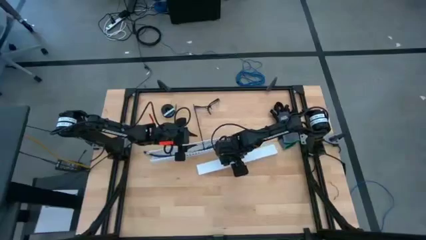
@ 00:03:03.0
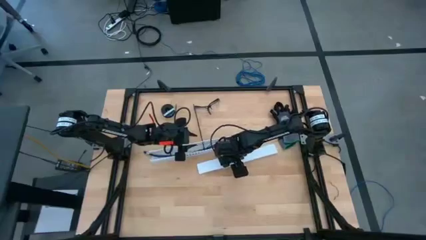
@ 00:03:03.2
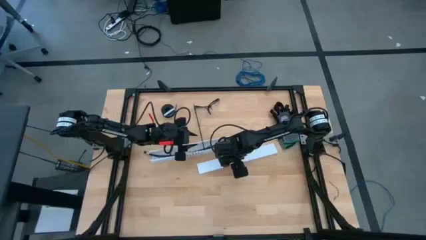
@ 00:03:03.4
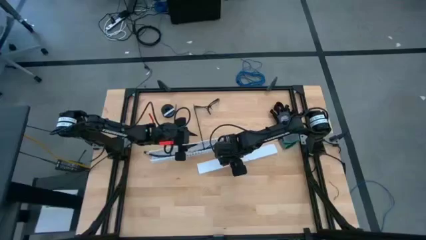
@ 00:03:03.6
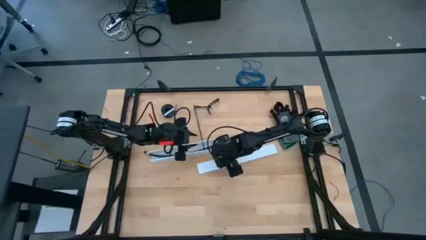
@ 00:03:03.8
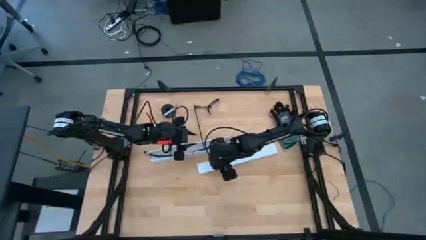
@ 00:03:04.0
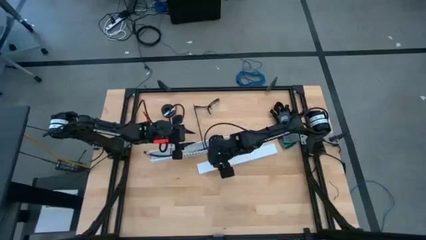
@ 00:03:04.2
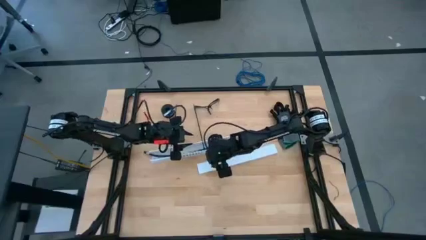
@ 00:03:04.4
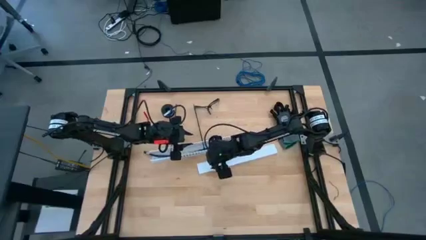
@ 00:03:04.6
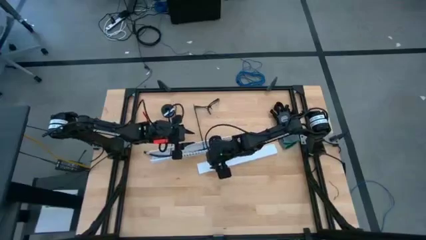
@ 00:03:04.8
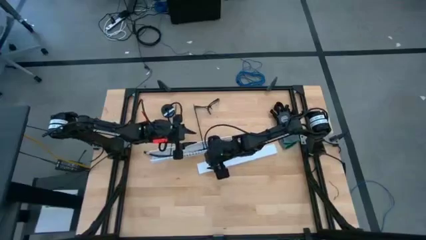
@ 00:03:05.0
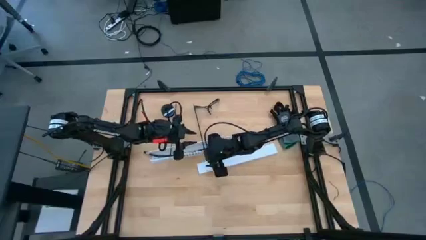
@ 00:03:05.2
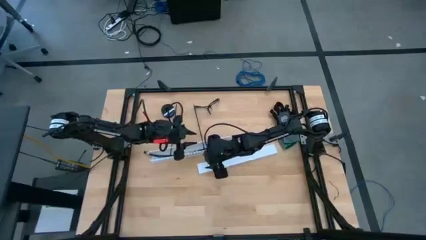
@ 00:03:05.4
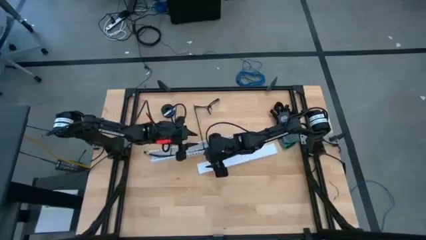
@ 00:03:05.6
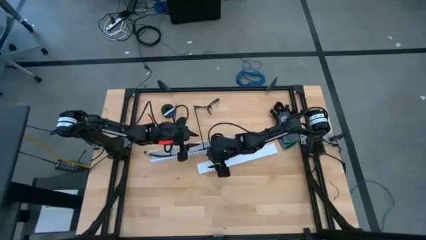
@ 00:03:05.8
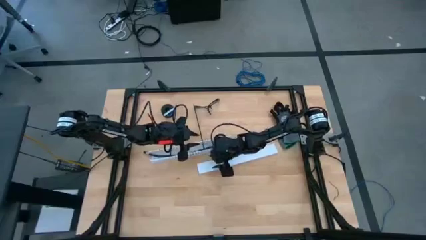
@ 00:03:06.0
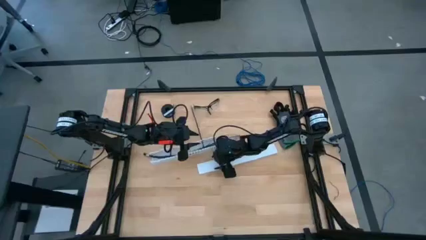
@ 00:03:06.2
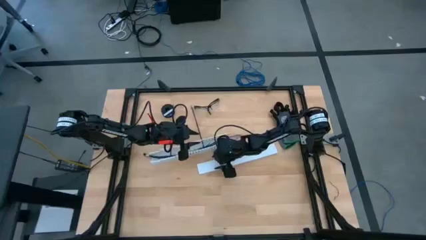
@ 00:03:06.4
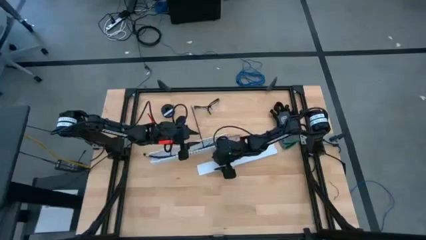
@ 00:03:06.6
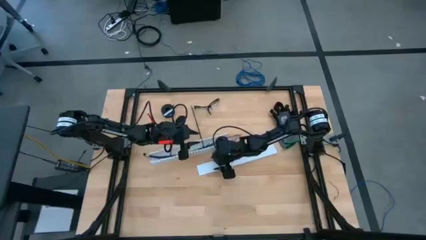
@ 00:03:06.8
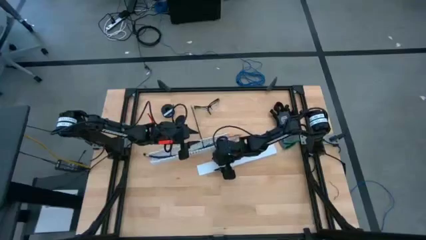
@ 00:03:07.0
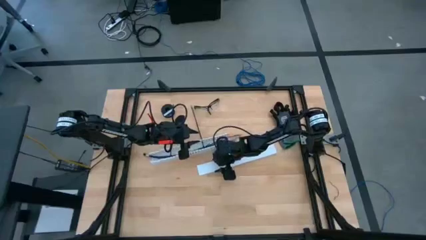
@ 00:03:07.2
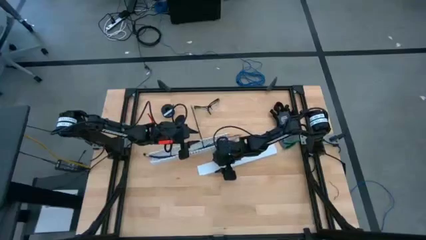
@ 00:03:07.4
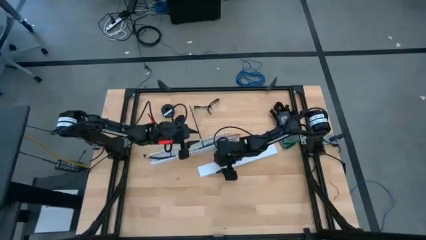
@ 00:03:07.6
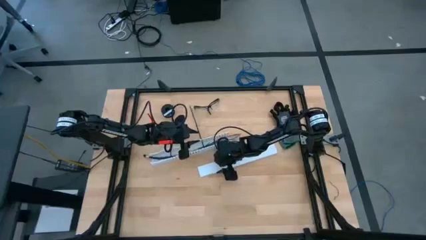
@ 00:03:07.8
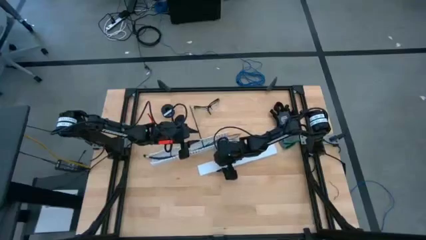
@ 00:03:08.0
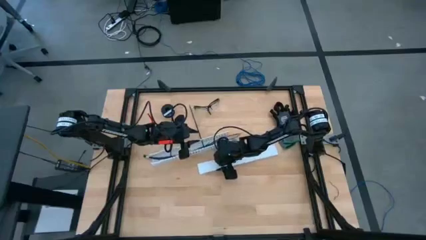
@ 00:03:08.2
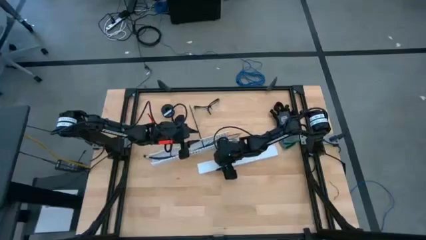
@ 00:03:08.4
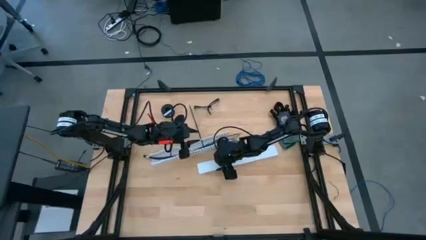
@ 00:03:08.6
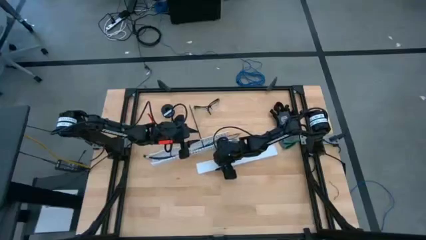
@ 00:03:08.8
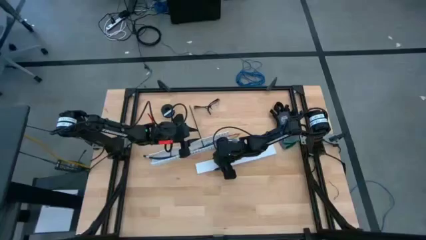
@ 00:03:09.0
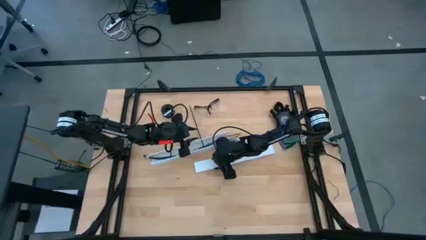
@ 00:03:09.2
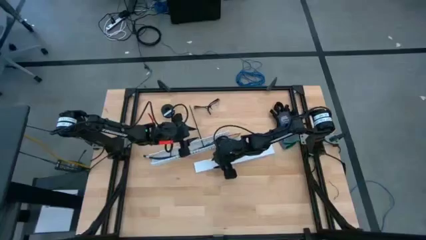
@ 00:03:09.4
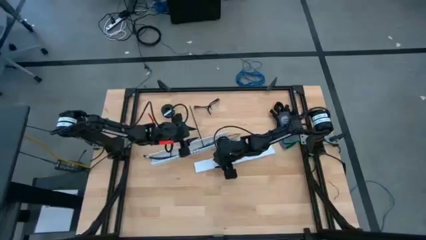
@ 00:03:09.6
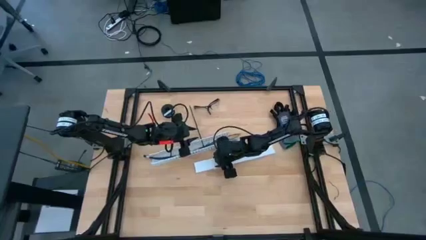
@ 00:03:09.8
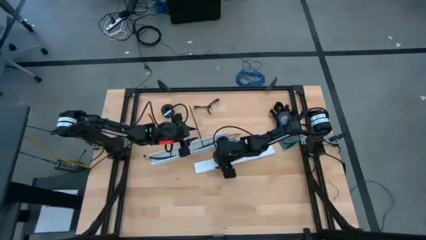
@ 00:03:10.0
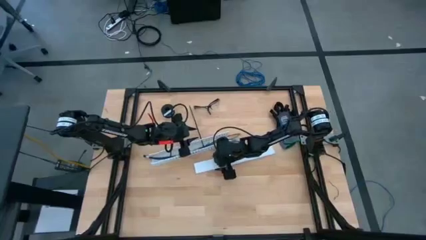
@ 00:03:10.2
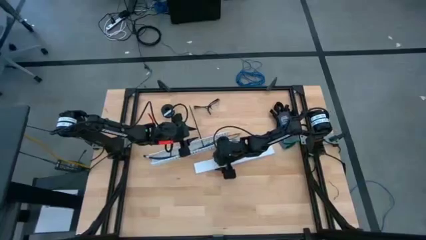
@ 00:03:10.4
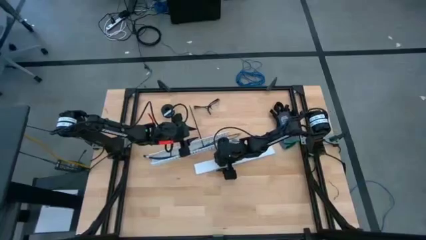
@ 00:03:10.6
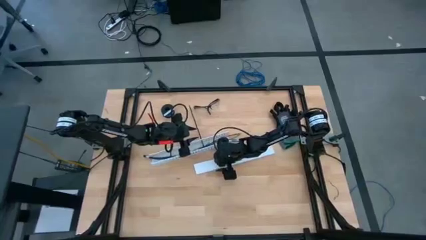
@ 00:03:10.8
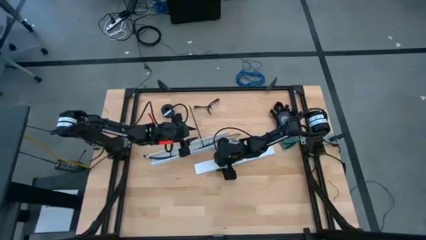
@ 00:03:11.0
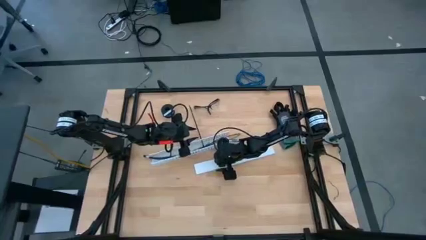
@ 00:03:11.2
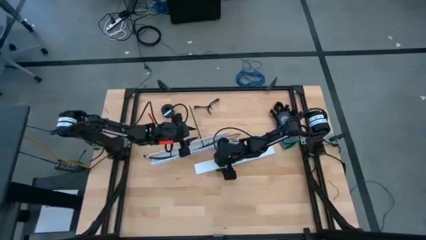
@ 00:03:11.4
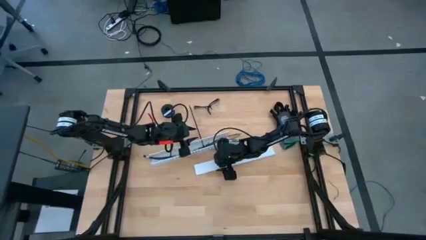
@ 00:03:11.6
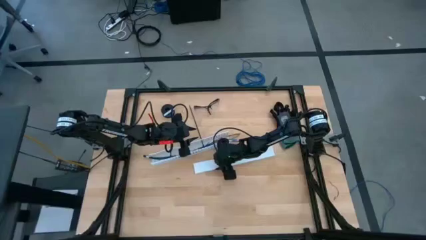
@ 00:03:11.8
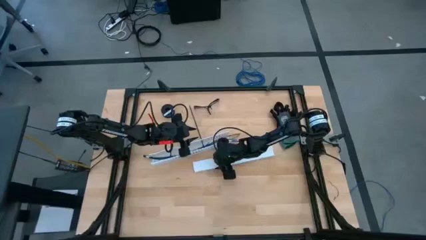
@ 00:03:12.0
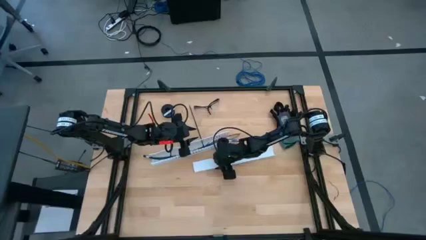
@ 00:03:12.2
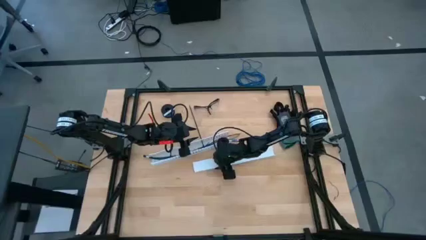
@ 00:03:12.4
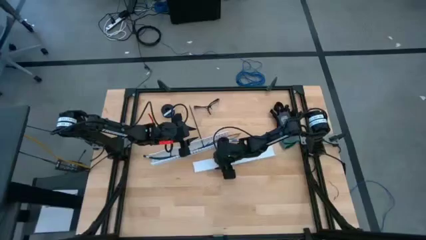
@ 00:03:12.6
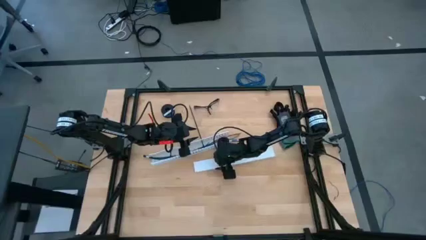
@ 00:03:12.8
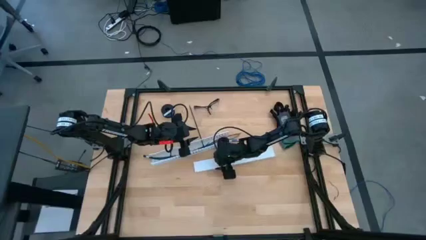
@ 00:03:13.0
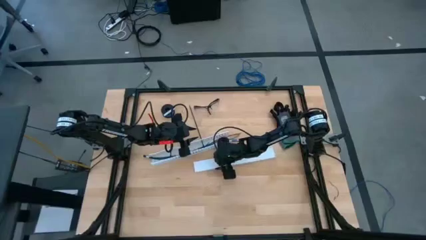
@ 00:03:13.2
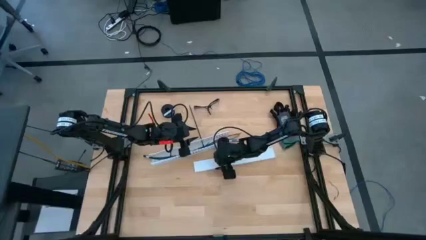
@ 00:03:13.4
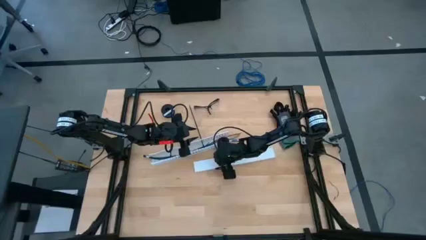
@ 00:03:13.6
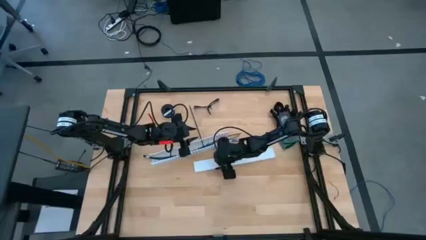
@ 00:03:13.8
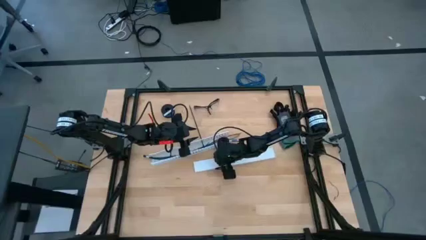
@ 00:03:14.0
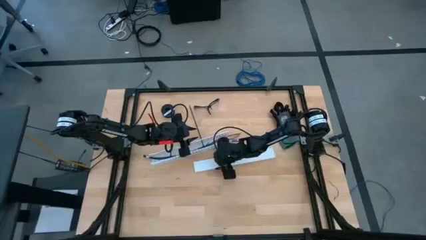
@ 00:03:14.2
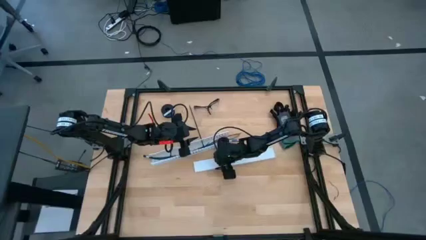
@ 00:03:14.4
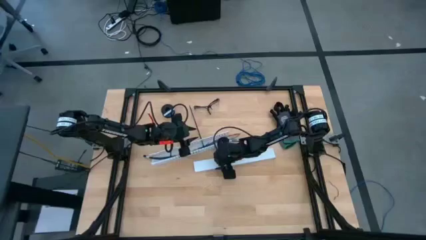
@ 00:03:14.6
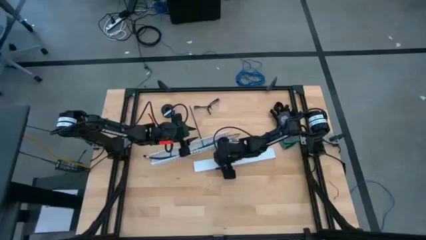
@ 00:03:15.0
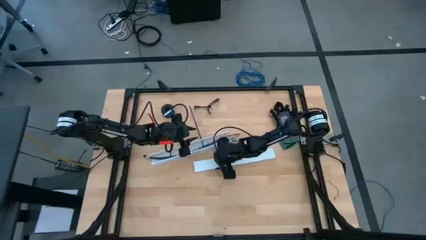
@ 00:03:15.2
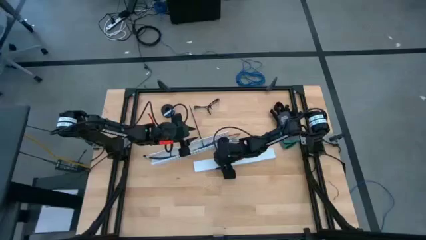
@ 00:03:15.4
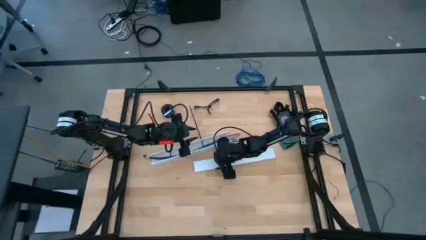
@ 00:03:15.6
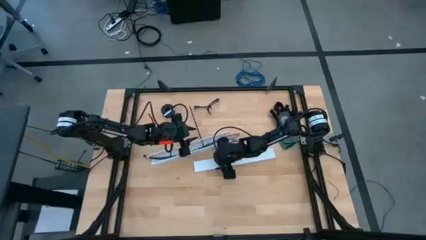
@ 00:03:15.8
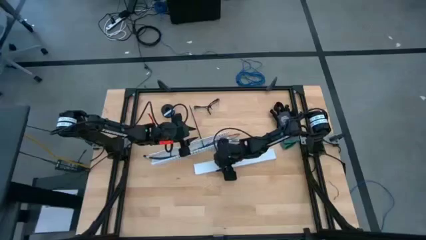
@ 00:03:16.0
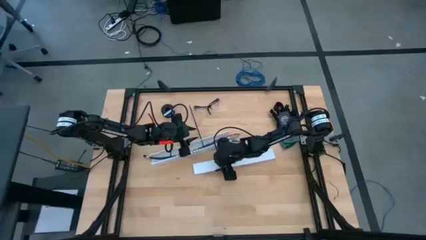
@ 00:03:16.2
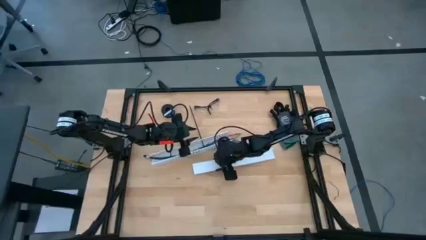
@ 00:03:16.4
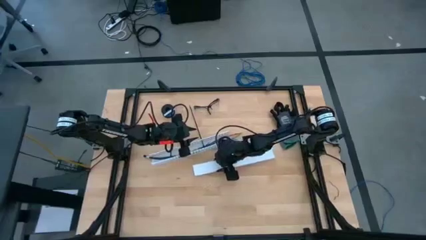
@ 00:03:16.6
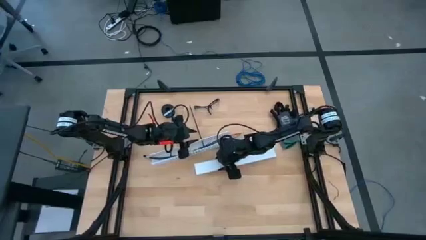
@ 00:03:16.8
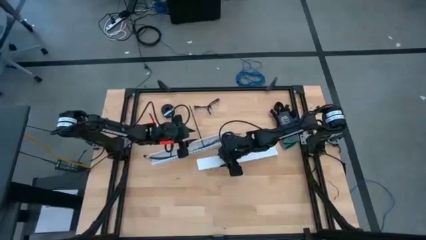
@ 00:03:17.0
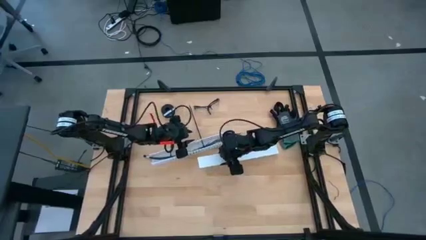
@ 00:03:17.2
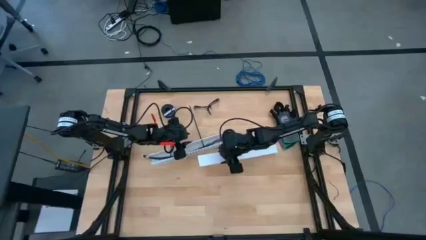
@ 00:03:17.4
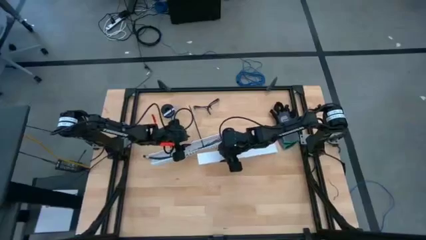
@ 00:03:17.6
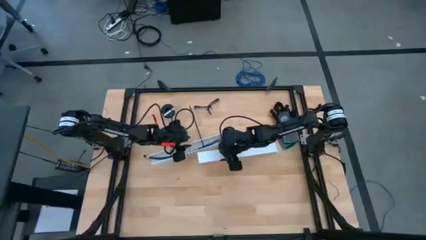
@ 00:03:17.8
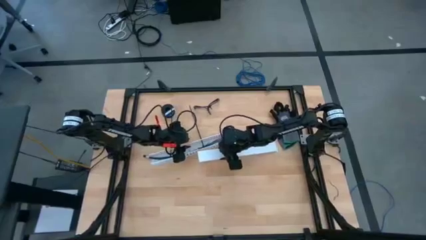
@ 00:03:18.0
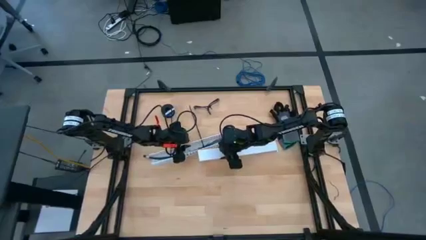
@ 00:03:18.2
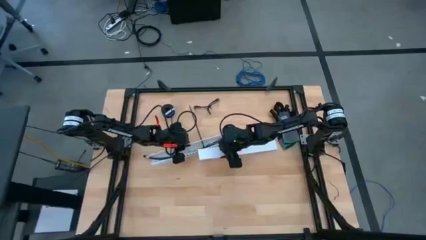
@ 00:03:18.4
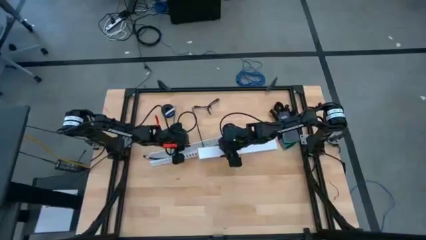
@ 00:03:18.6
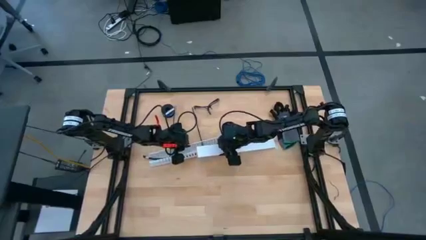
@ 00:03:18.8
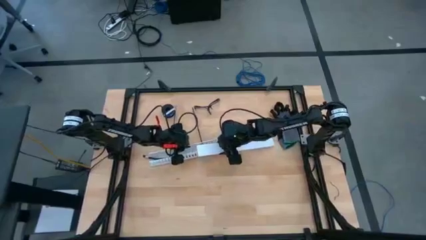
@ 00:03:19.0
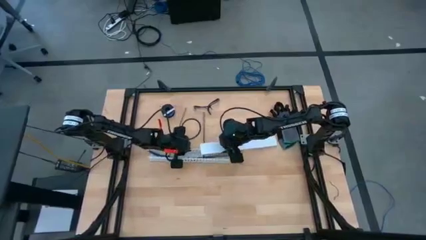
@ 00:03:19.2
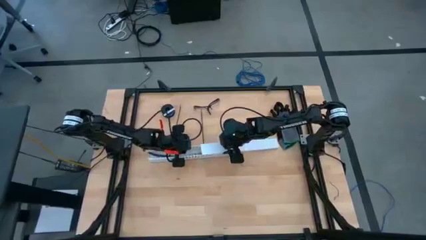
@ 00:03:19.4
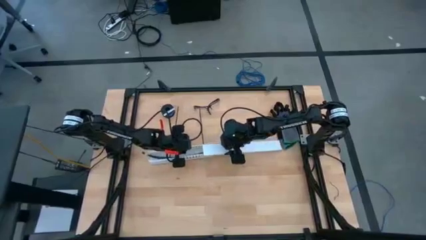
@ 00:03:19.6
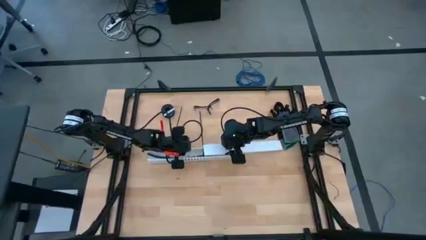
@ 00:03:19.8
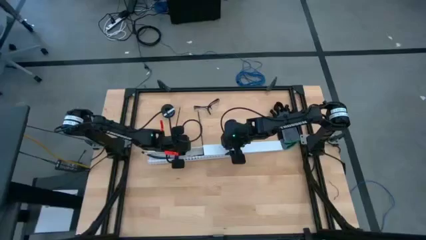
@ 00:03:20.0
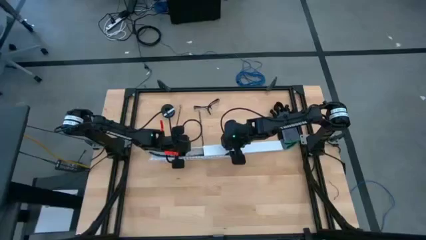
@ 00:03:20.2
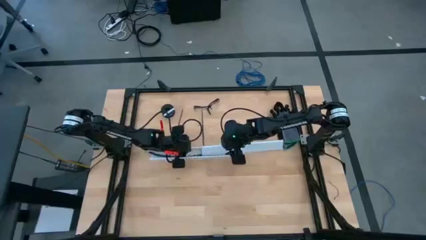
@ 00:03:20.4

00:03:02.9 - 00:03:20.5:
Task: Ziptie cables
Close the white cable duct
